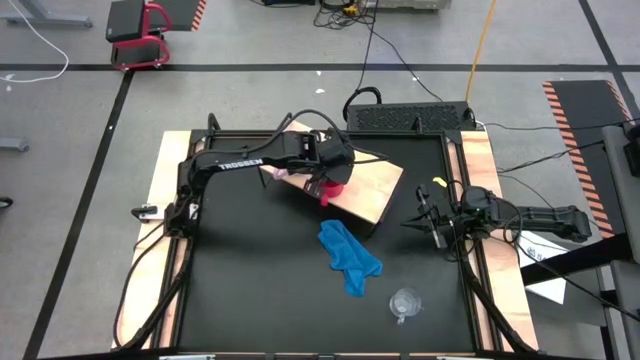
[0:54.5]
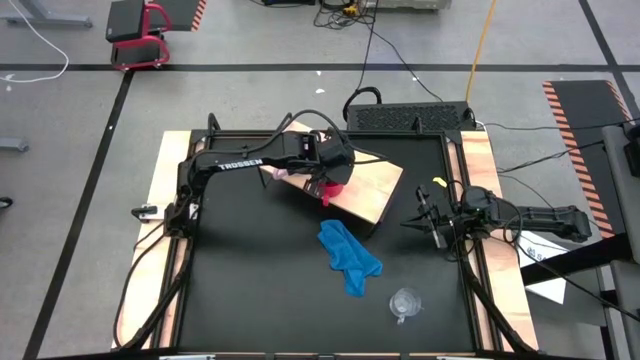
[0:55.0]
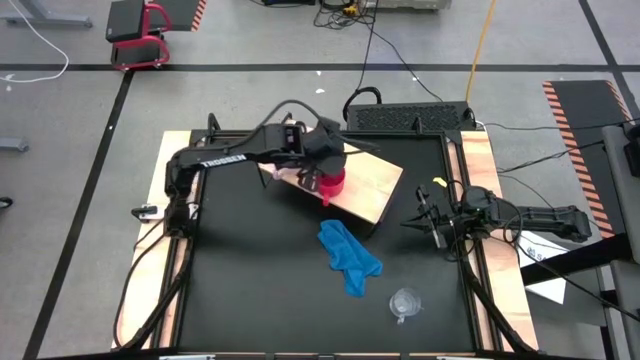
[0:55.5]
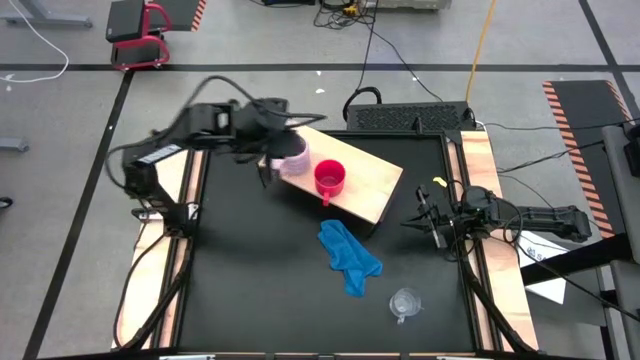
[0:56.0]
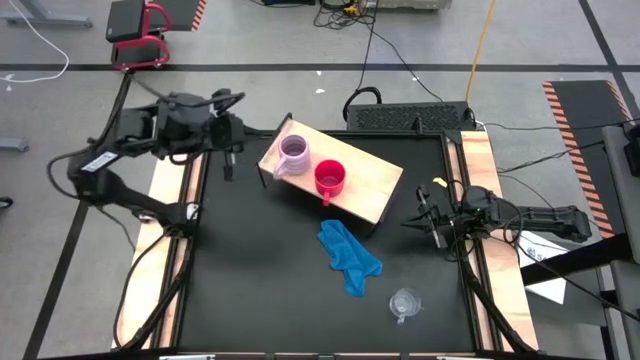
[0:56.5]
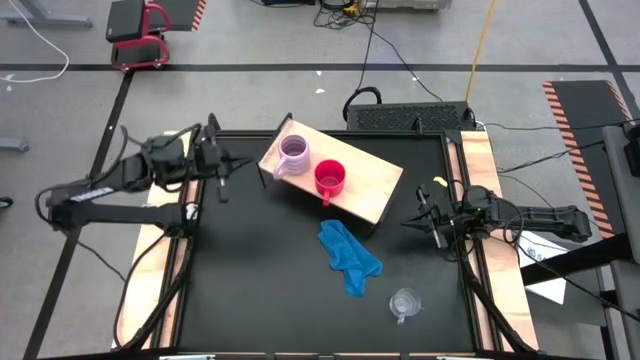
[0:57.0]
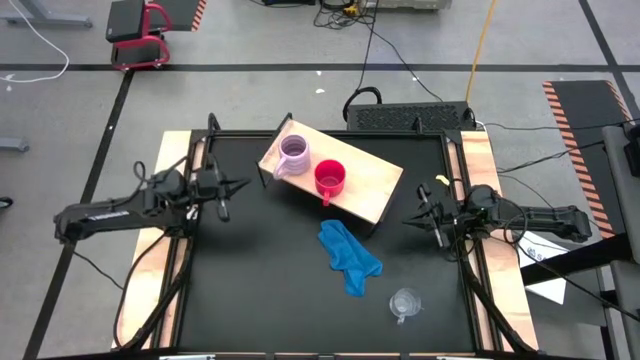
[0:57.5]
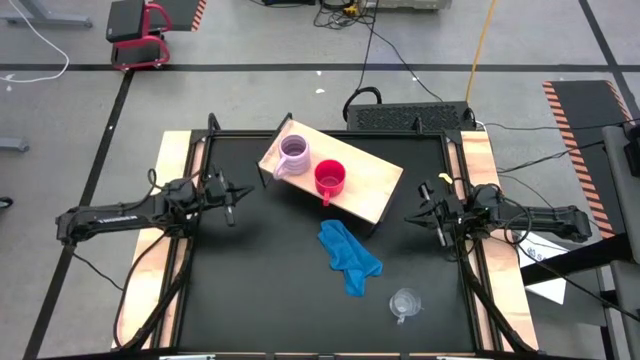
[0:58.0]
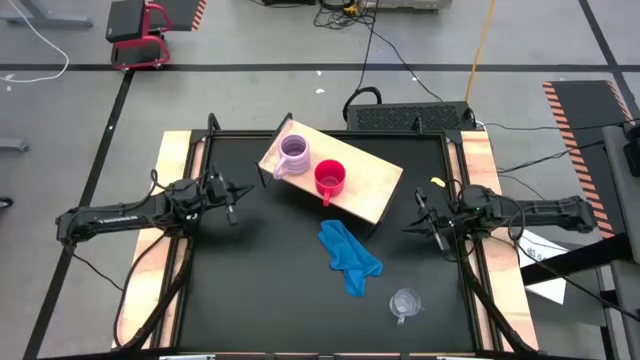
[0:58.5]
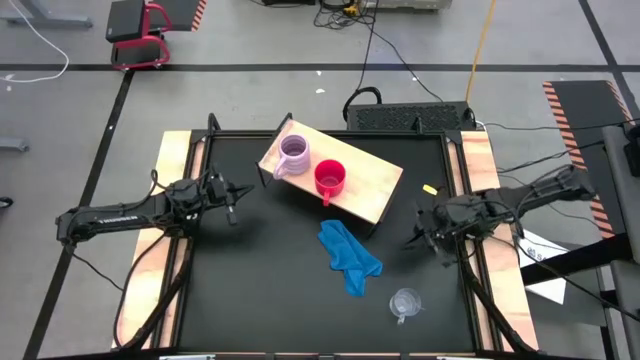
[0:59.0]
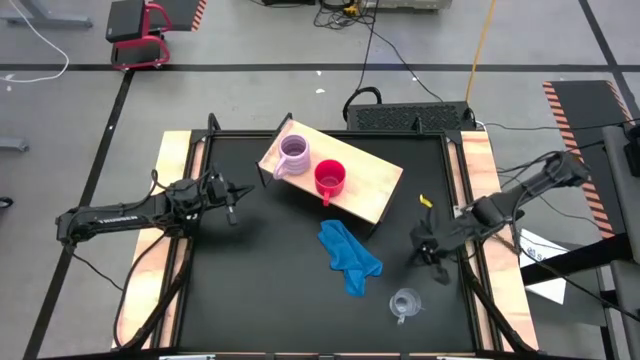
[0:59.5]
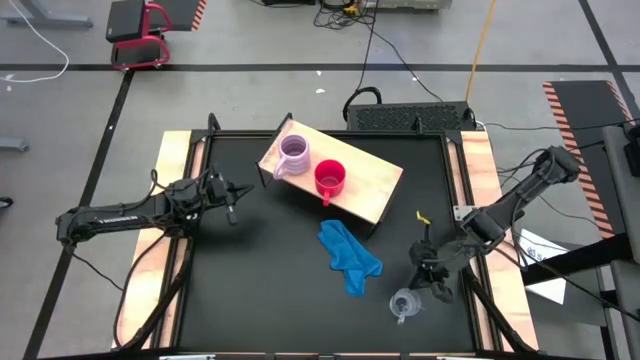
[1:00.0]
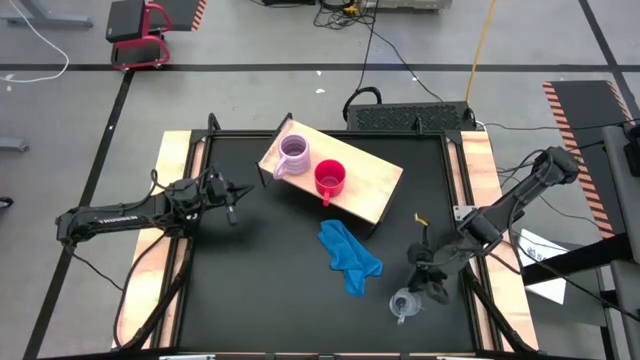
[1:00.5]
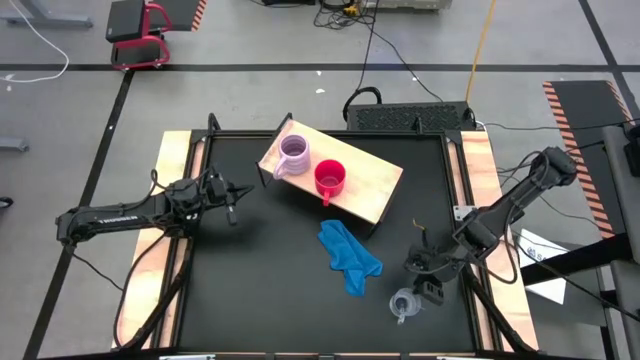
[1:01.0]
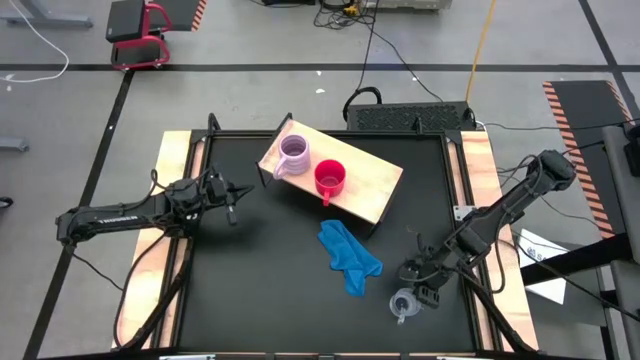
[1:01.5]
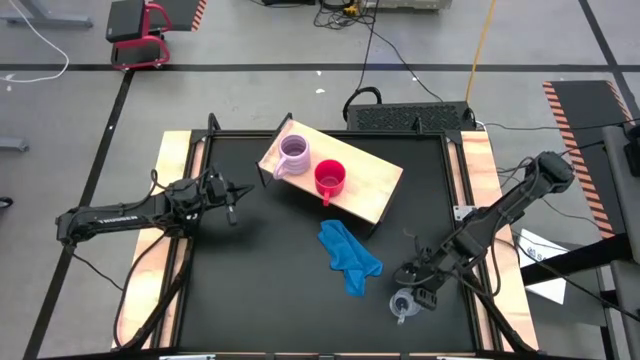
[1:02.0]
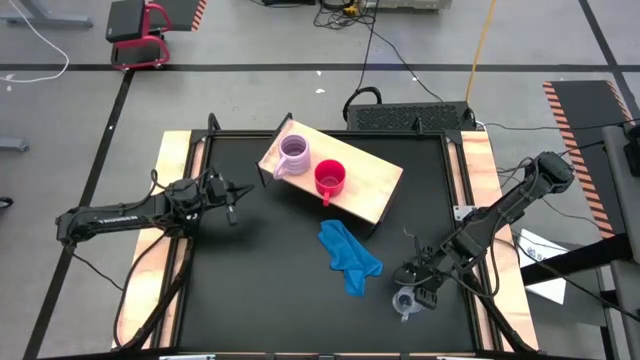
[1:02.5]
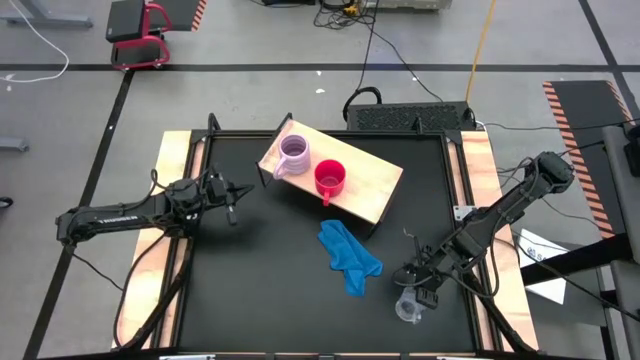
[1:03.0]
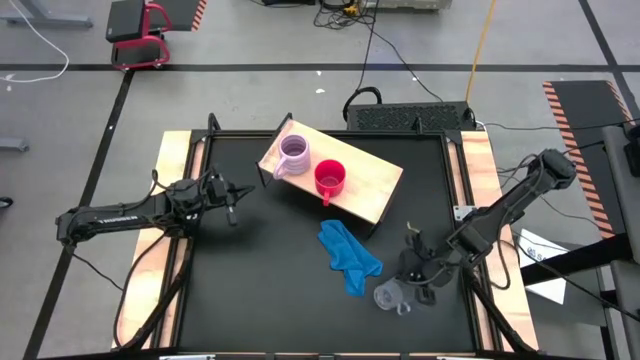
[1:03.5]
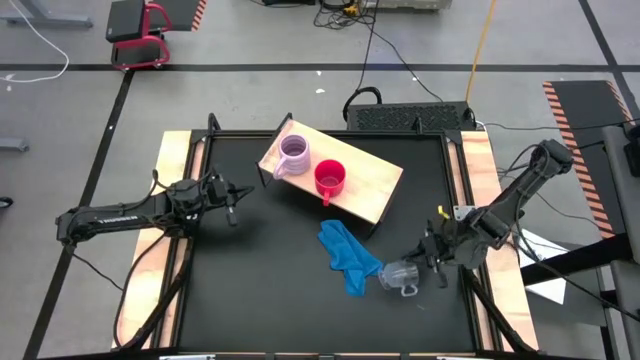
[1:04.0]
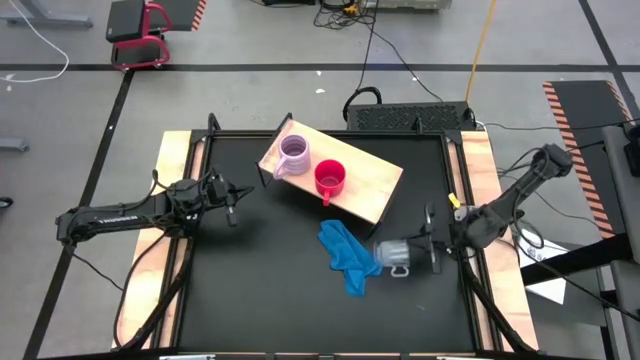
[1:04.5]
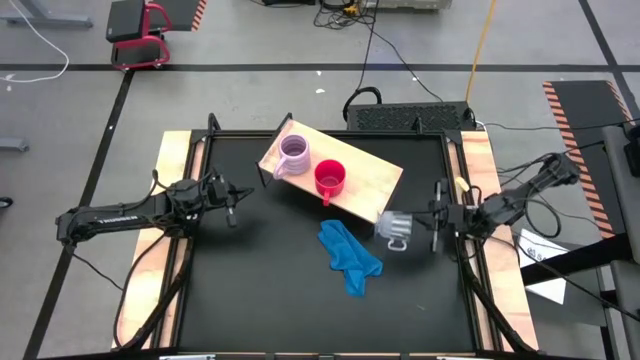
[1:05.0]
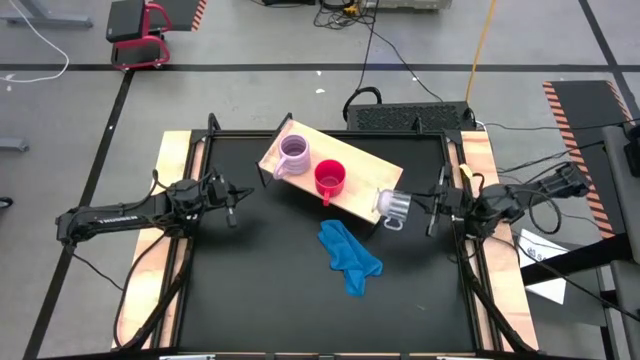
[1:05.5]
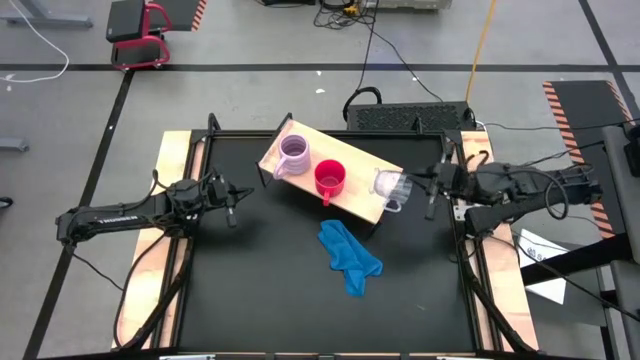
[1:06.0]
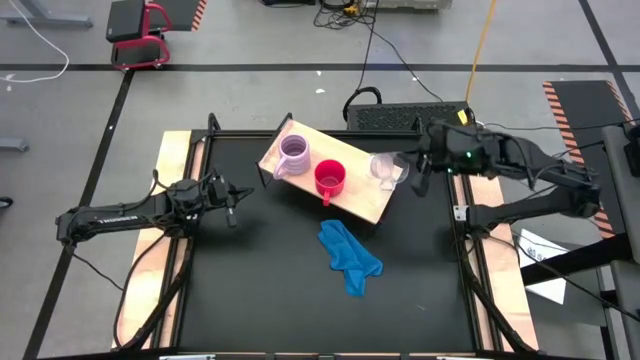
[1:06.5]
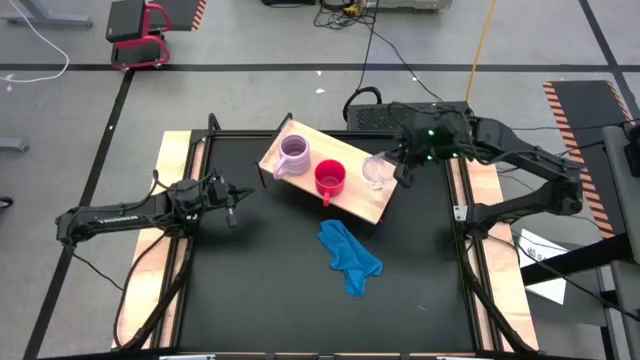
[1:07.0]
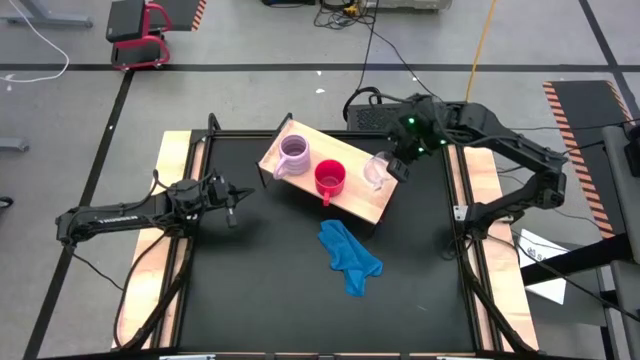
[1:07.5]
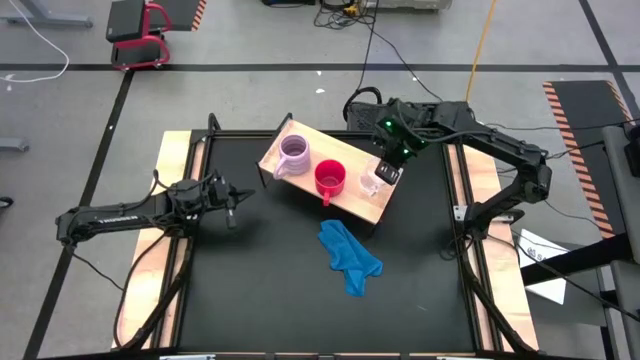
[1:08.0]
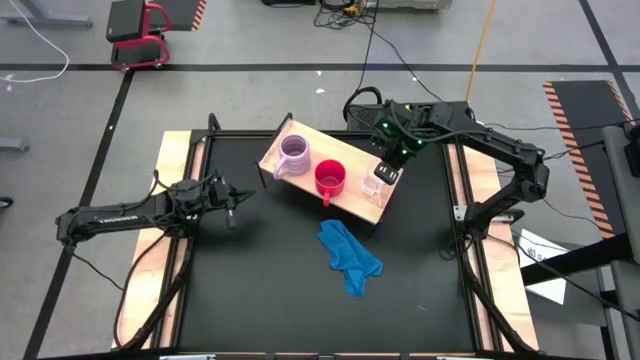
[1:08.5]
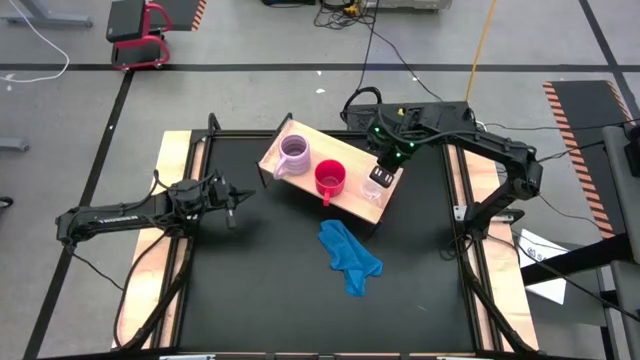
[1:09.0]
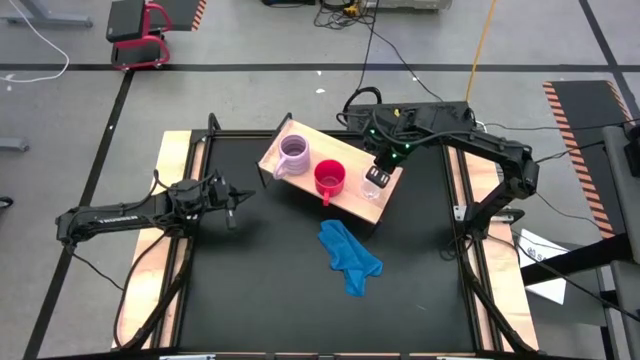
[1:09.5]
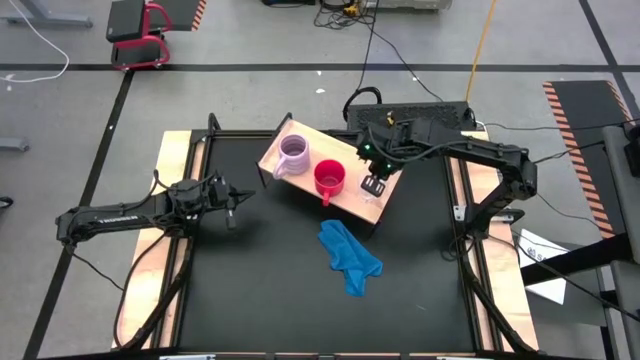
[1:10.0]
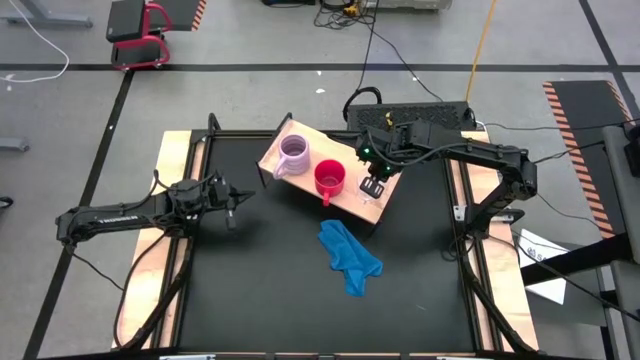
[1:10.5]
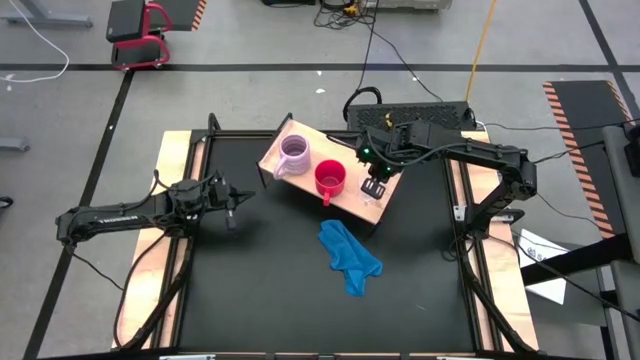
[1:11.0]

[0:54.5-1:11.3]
Task: Stack small to large cups/mugs on shelf
Put the transparent mug on the shelf

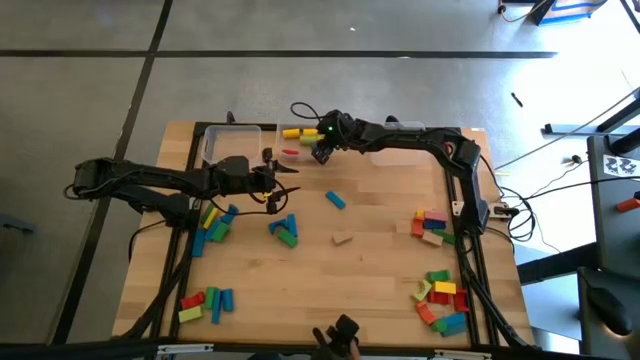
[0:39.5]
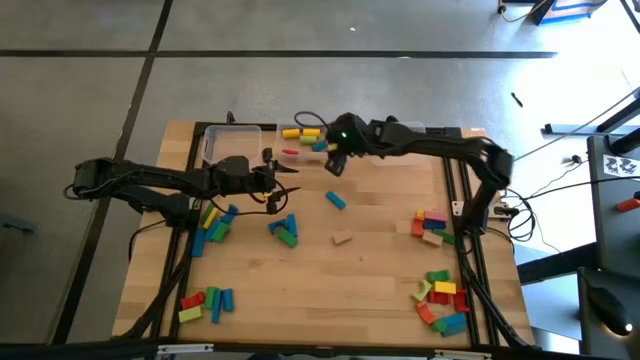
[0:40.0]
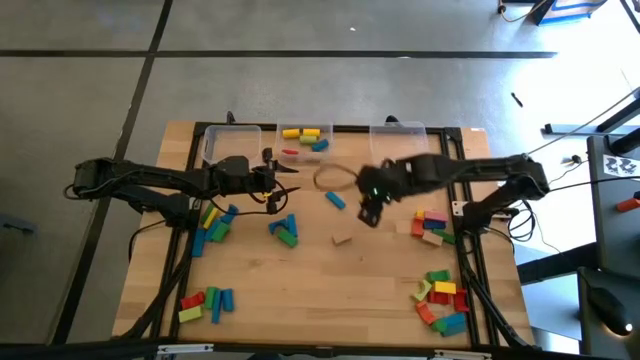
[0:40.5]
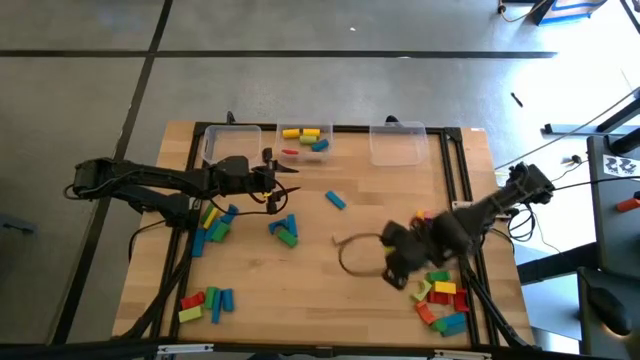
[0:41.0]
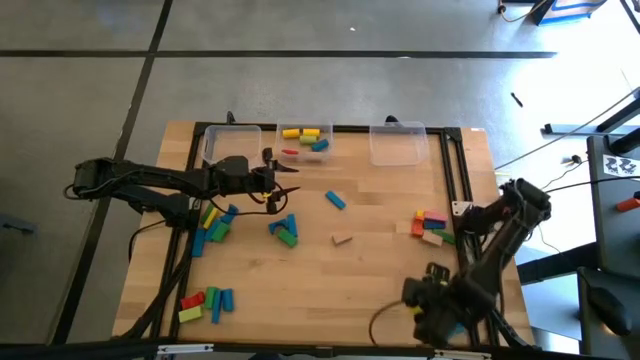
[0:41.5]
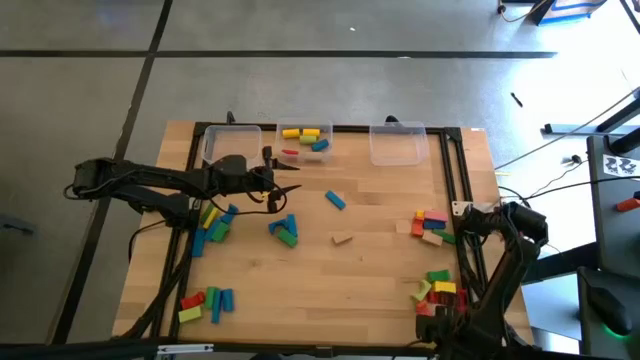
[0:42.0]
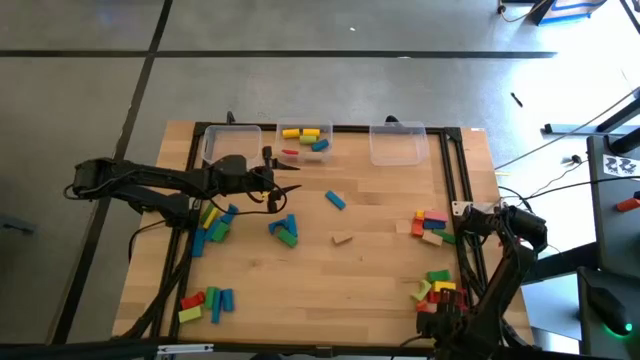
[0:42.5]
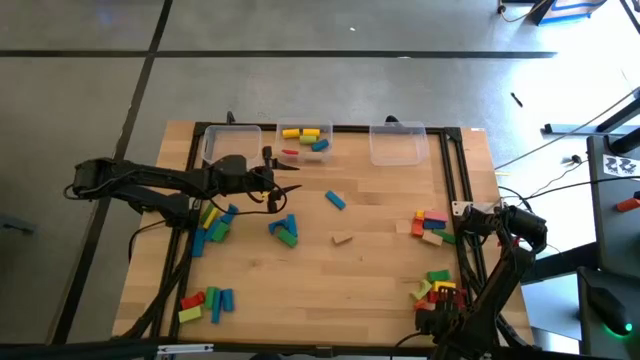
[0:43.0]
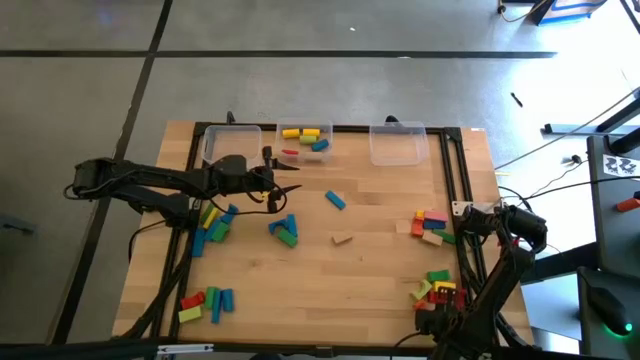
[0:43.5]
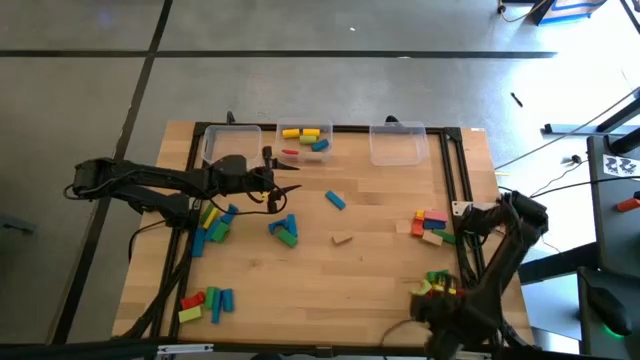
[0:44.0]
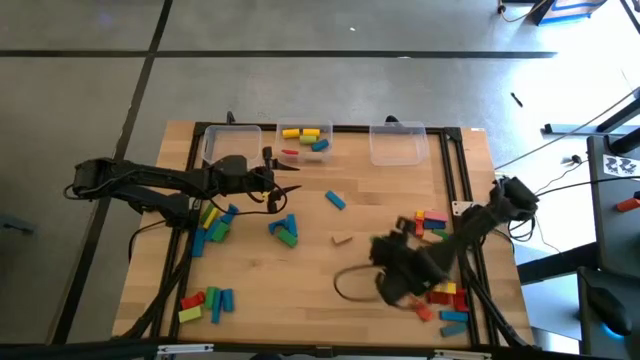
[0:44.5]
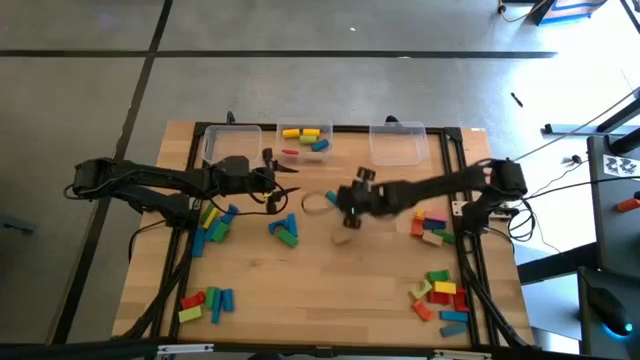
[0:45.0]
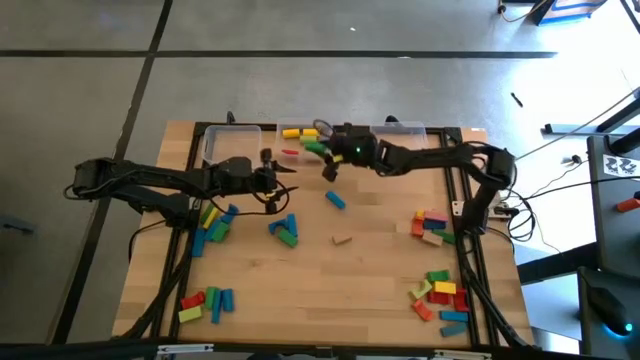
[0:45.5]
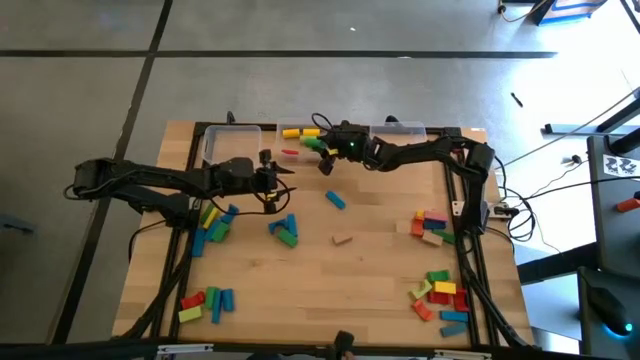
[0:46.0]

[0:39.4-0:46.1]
Task: Sort blocks by size
Put the green cylindrical block into the middle transparent bin
